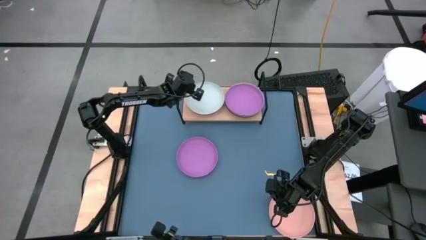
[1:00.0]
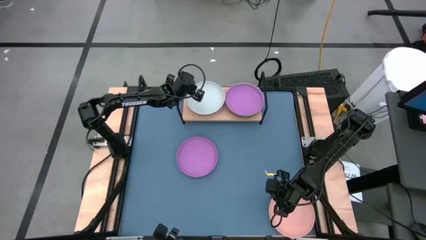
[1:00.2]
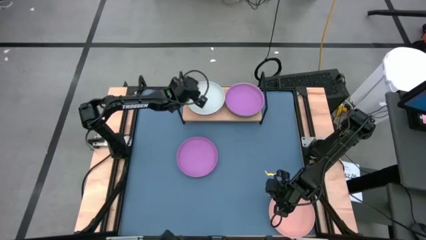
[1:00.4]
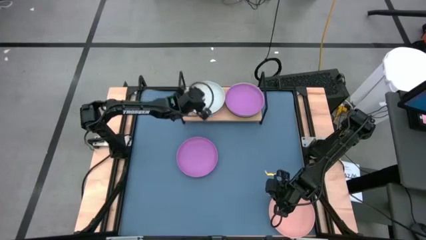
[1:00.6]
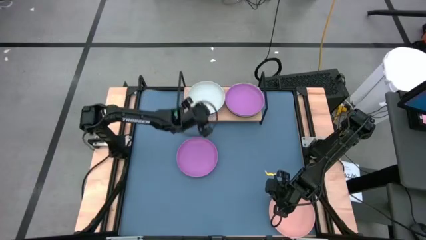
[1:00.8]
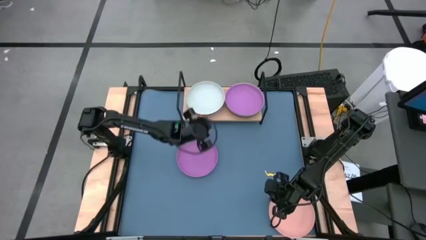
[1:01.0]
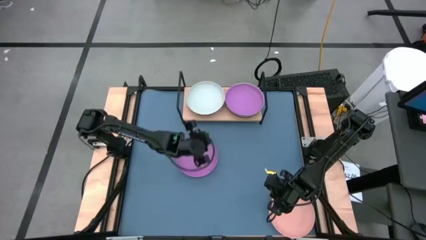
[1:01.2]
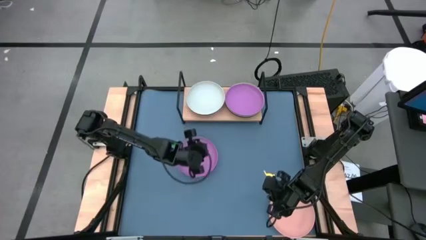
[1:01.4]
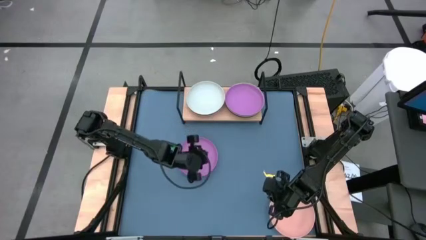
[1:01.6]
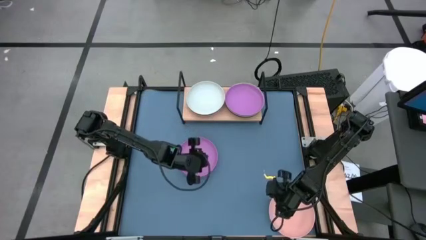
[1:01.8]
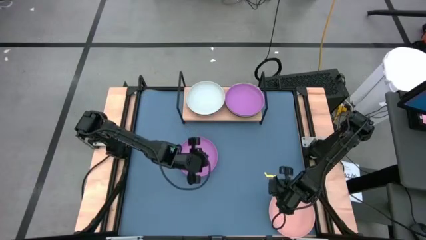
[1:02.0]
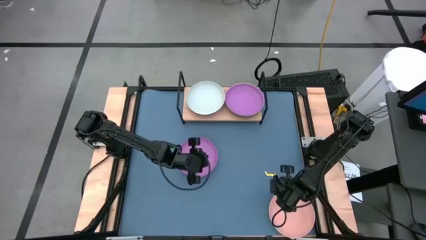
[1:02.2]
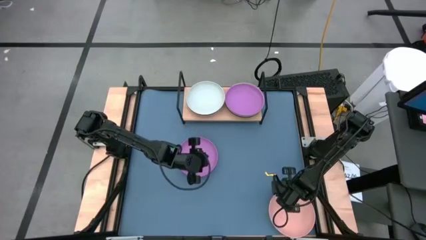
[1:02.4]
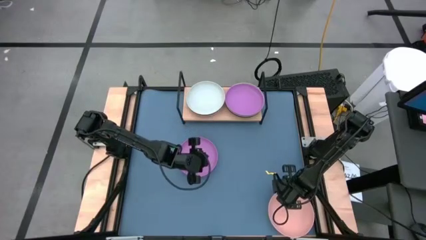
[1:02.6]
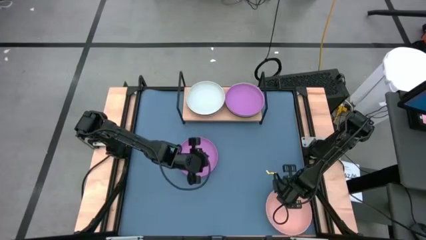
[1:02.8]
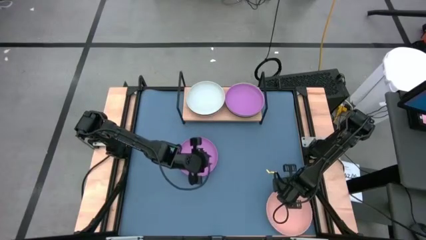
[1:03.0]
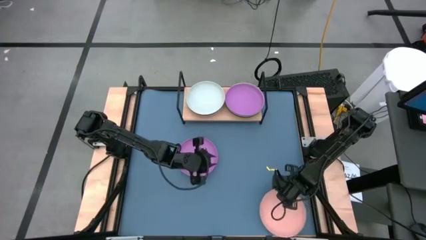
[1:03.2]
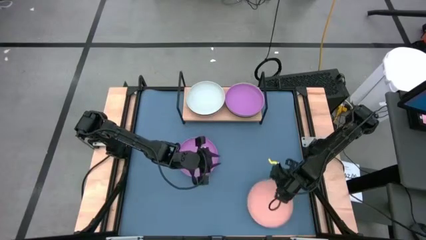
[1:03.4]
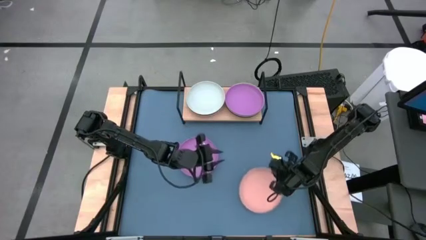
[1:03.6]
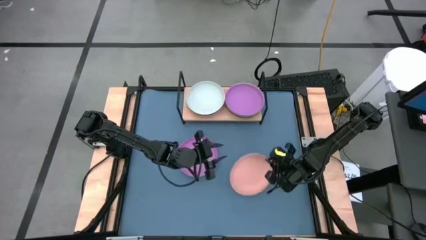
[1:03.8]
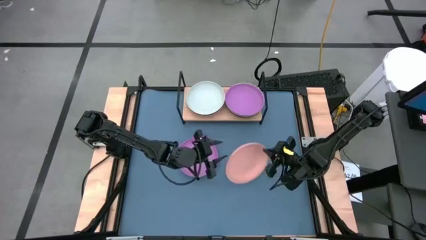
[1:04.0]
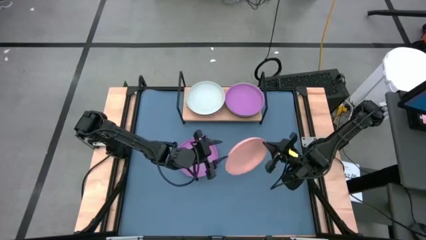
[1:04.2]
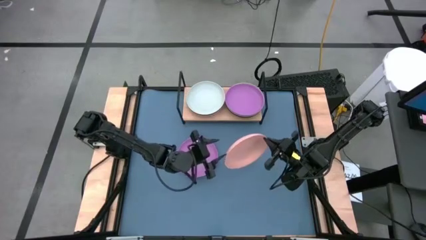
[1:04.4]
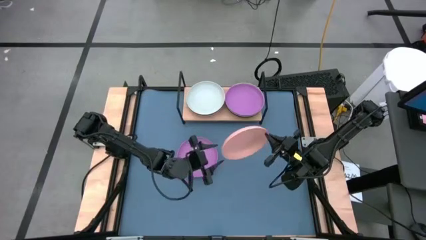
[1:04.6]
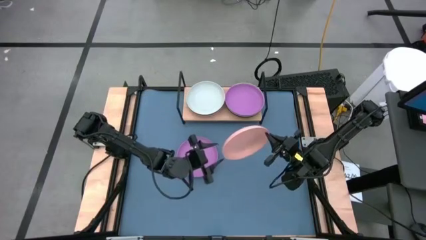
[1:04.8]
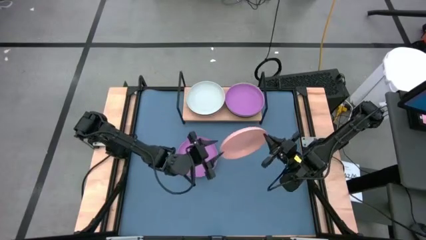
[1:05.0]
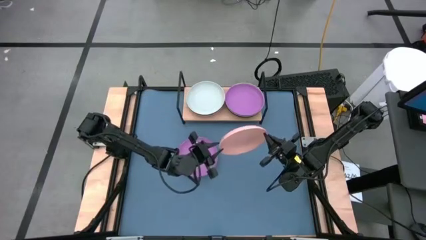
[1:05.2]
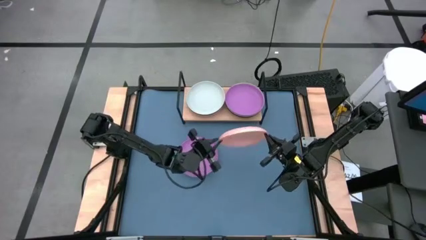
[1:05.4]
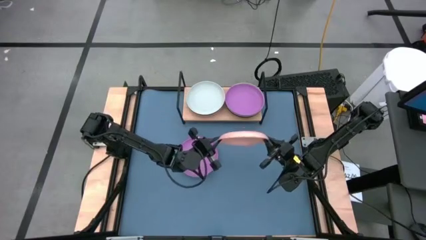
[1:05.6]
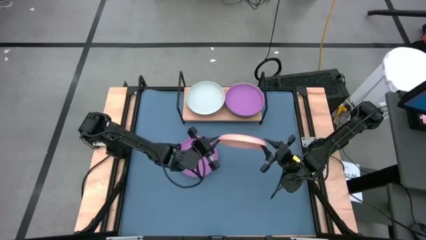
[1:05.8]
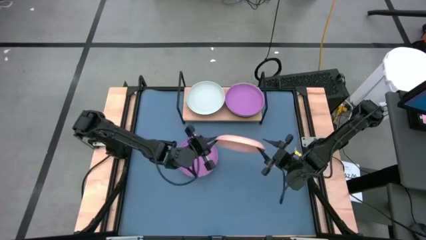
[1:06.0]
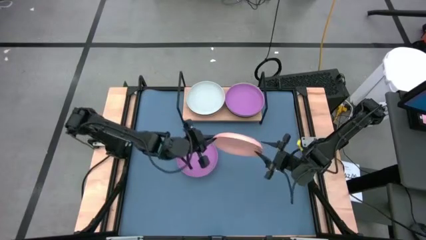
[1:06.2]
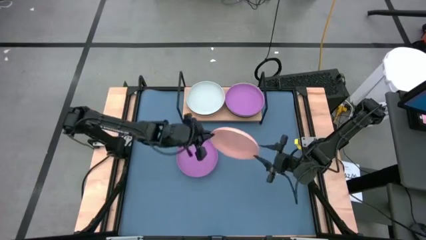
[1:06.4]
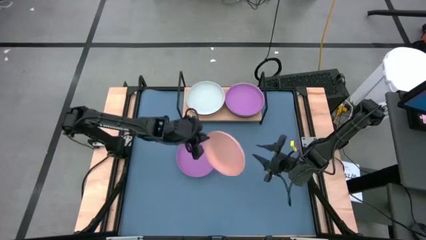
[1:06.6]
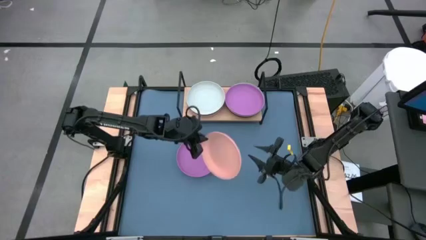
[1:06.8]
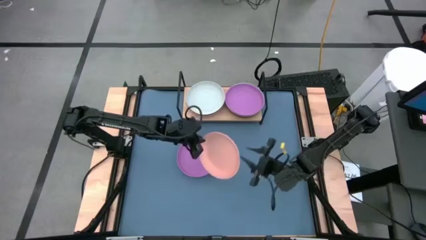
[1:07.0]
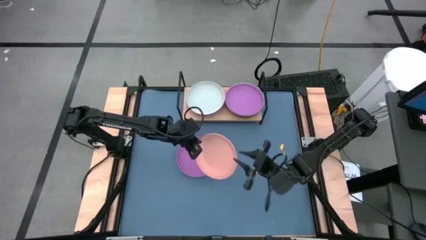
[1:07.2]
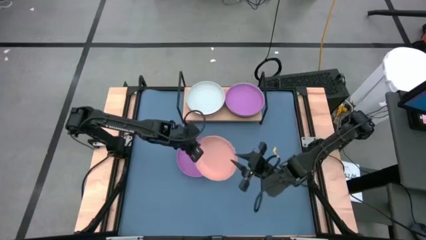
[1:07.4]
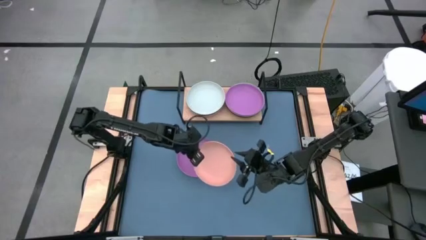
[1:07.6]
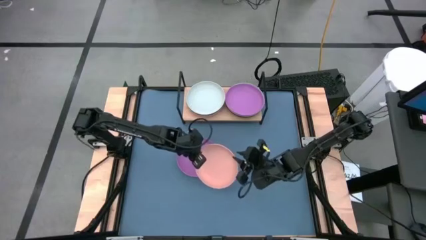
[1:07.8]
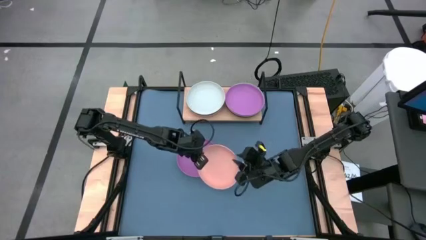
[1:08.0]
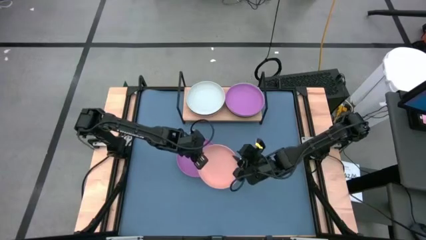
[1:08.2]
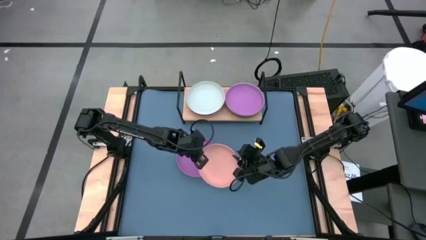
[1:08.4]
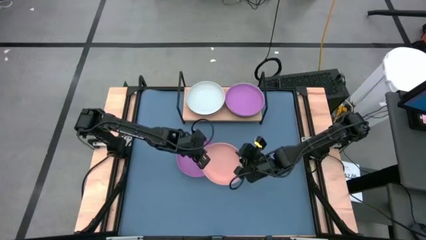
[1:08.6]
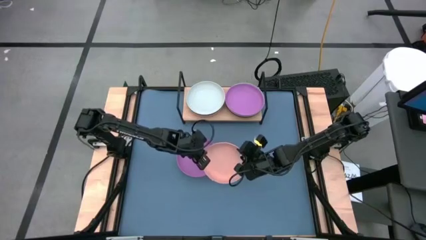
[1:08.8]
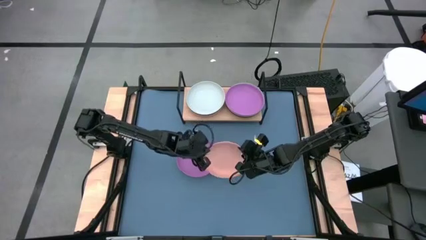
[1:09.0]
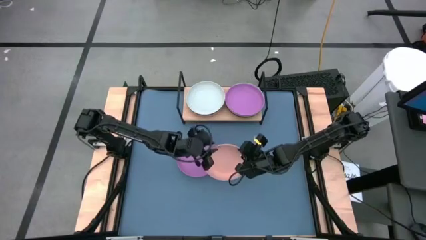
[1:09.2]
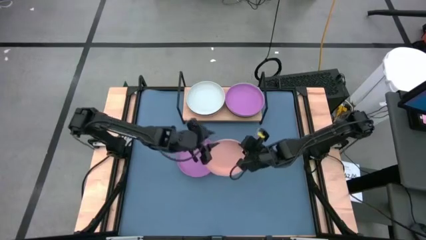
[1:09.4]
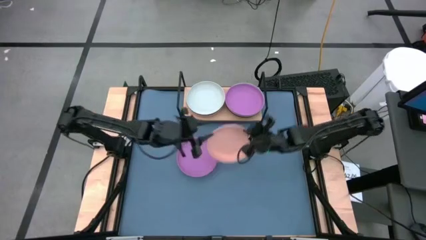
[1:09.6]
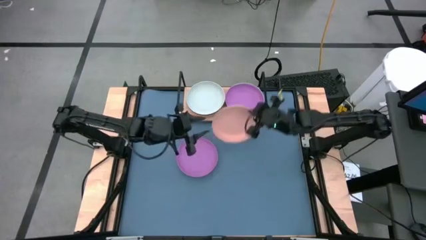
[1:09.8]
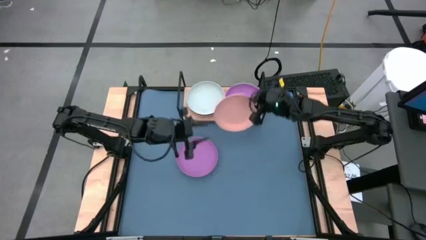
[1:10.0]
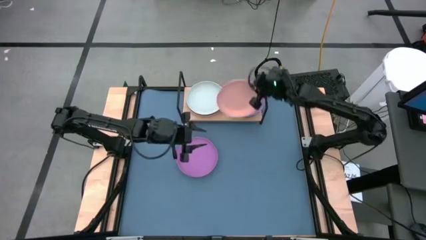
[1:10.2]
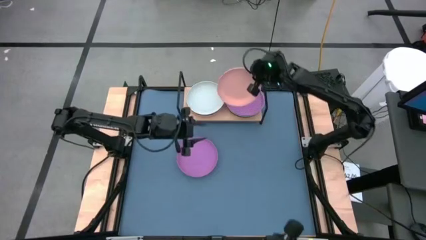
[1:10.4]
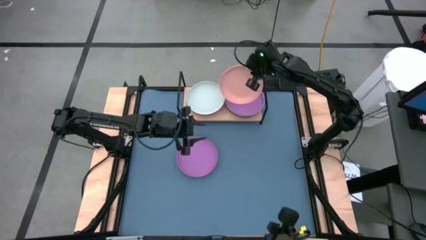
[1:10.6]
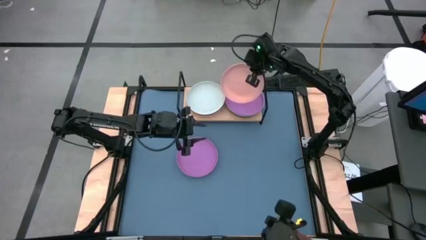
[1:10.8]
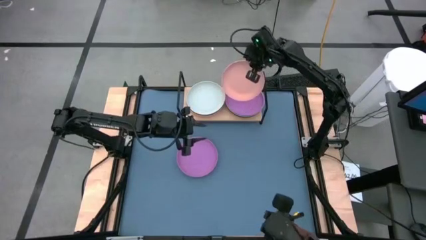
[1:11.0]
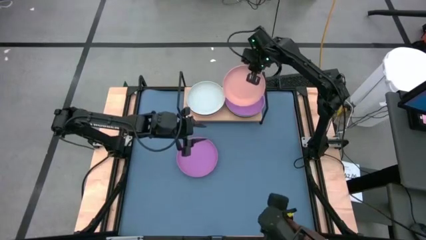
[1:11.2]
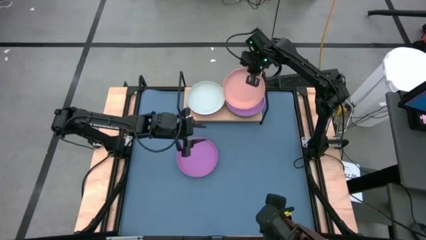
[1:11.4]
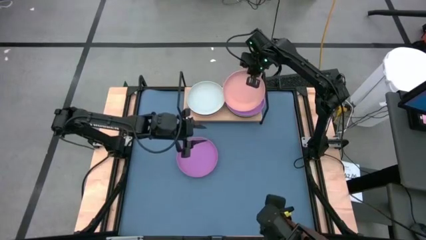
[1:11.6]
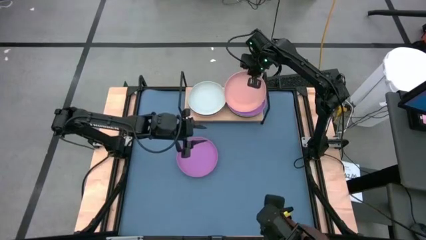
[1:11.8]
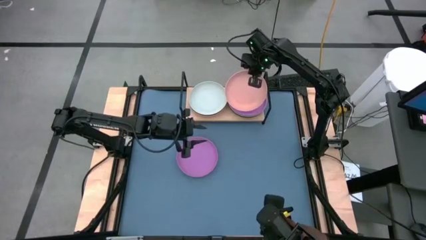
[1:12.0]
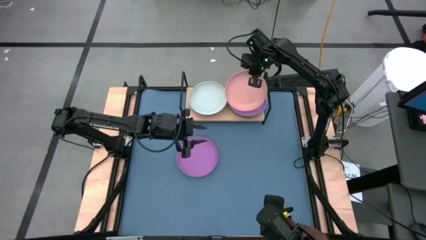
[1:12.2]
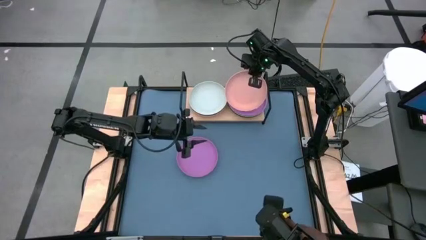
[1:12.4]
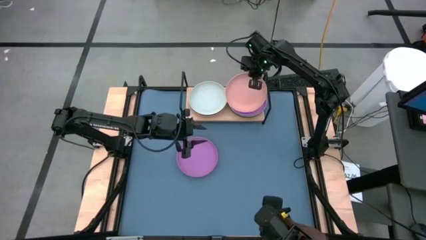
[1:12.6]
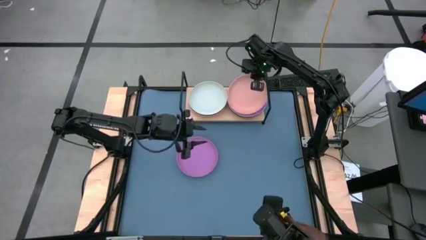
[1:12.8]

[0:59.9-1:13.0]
Task: Place and stack plates onto a shelf
Stack the pink bowl on the purple bowl

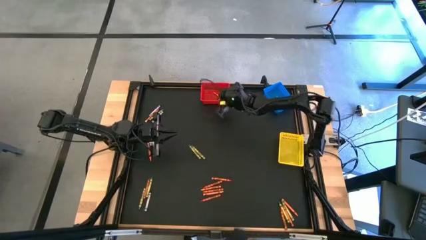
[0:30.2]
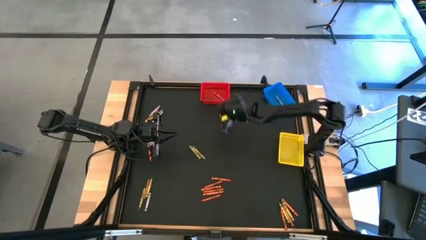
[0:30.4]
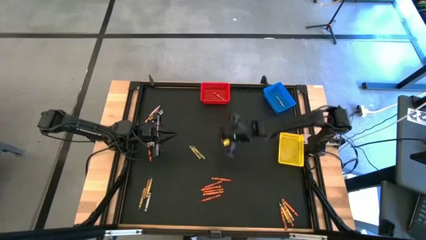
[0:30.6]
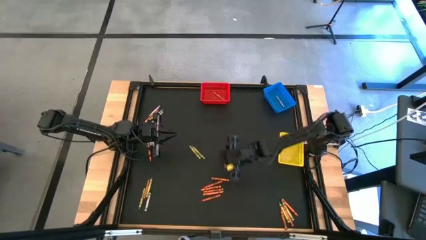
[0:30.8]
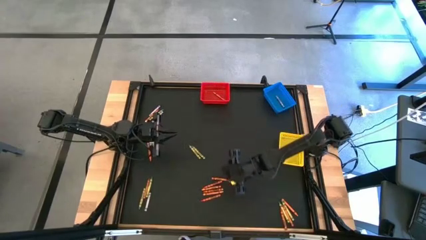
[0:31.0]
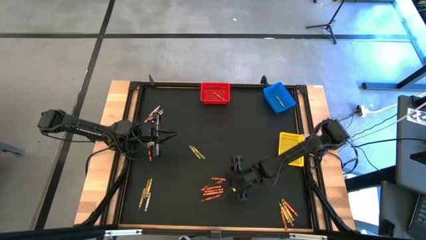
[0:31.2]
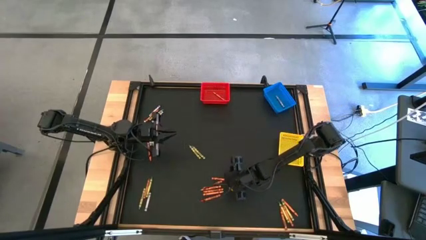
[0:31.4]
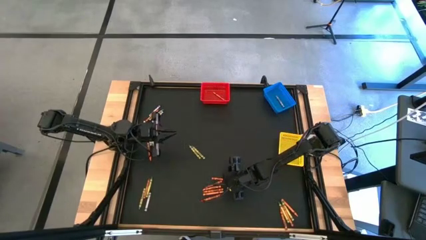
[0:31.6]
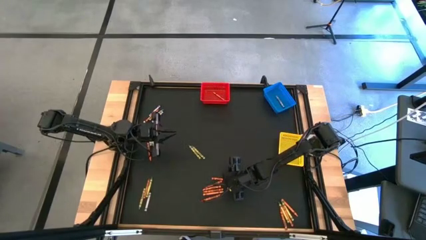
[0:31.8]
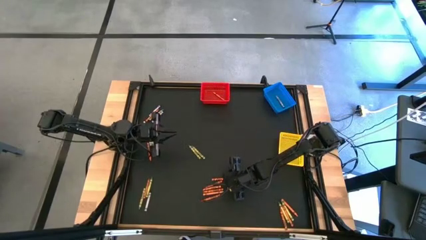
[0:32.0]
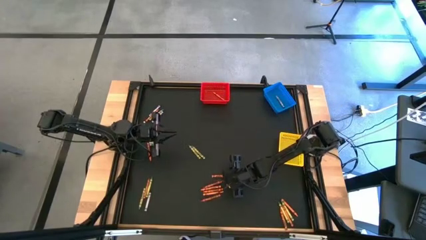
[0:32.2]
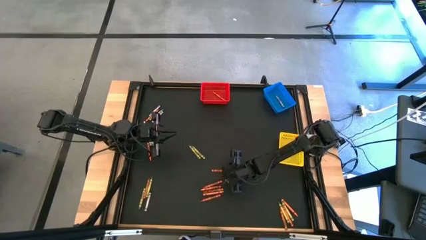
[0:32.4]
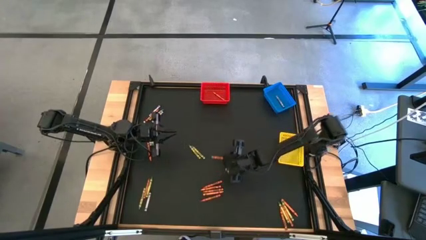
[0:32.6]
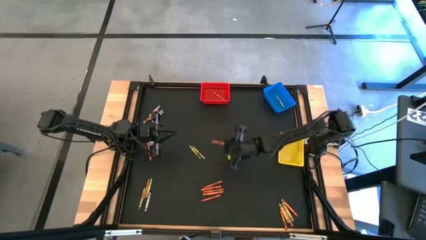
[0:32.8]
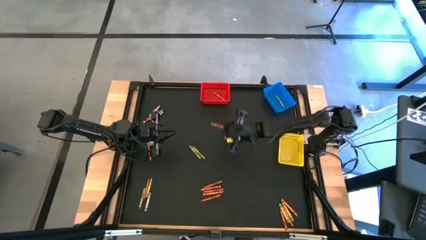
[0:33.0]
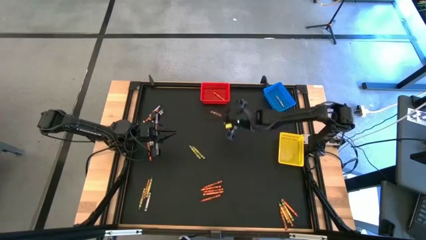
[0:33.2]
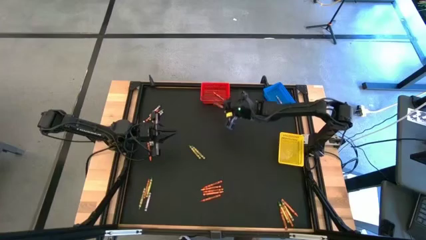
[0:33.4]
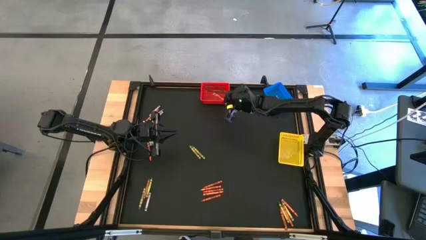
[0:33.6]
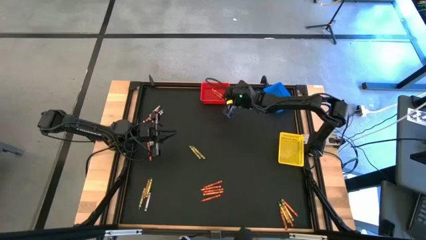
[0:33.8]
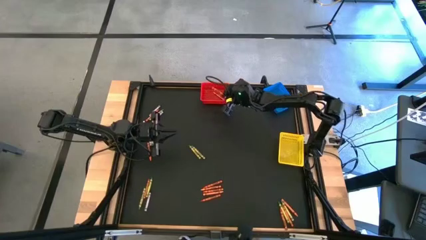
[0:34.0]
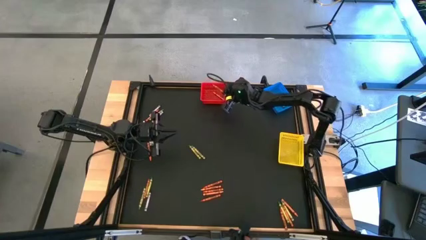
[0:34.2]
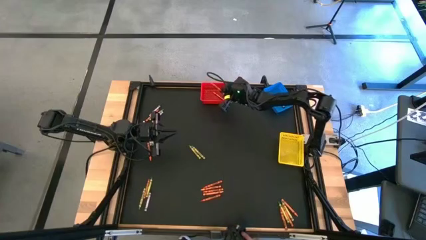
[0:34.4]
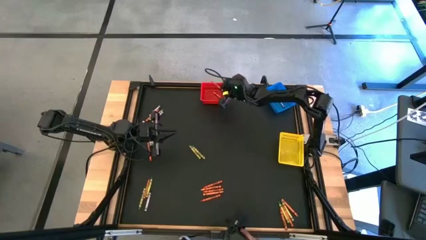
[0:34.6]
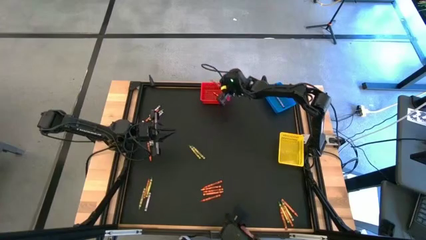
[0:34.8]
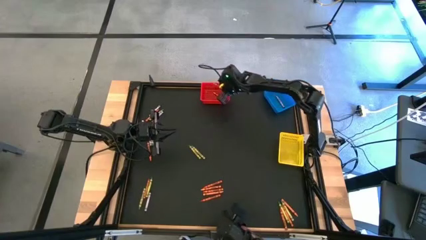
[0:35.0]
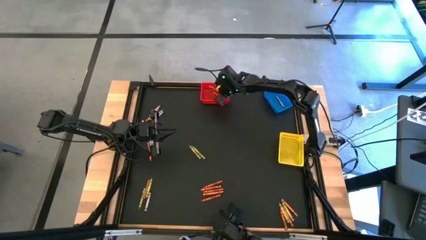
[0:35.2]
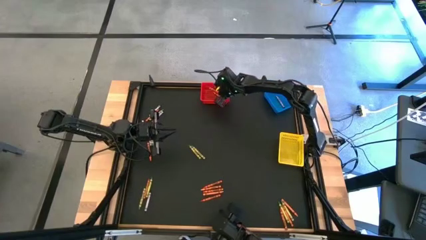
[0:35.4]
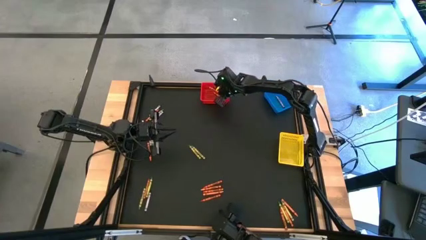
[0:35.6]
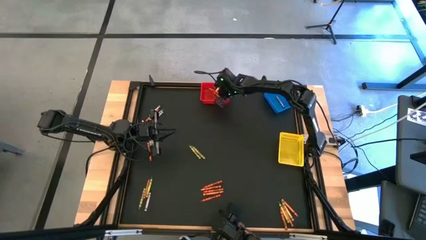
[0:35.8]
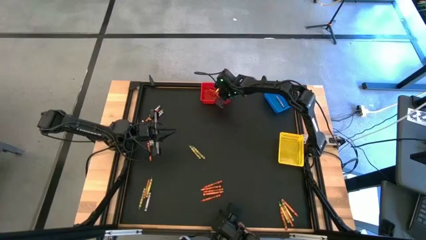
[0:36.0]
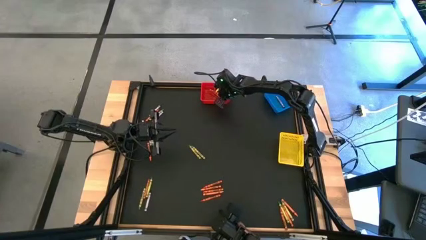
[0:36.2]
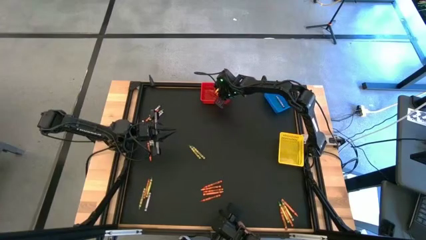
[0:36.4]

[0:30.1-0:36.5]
Task: Sort crayons
Put the orange crayon into the red bin
